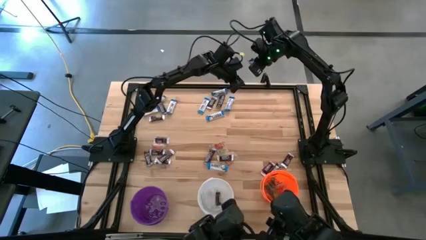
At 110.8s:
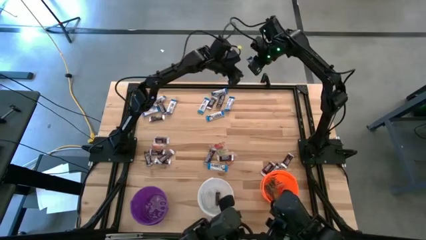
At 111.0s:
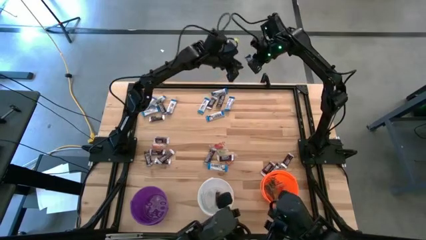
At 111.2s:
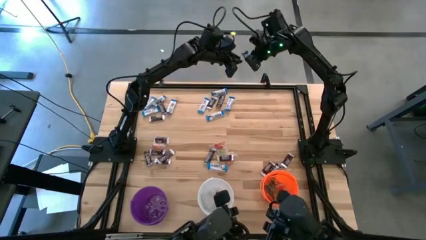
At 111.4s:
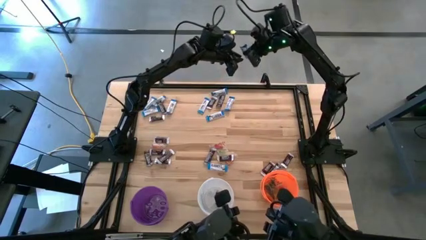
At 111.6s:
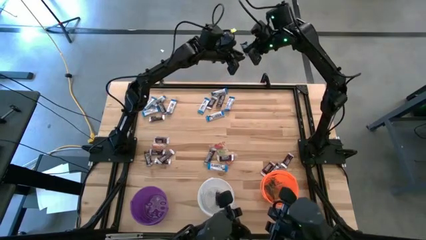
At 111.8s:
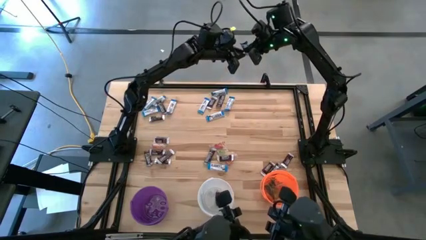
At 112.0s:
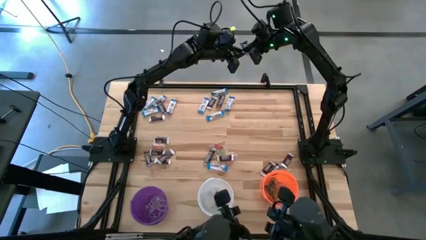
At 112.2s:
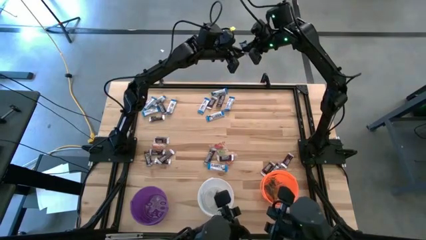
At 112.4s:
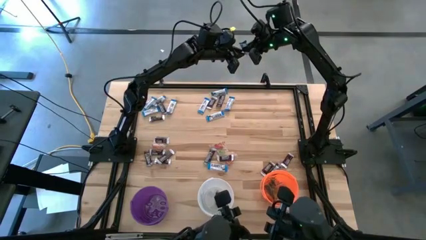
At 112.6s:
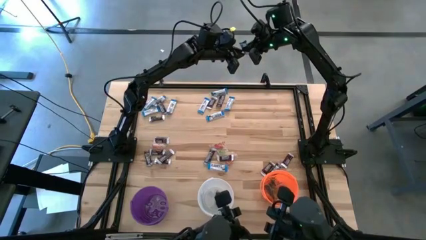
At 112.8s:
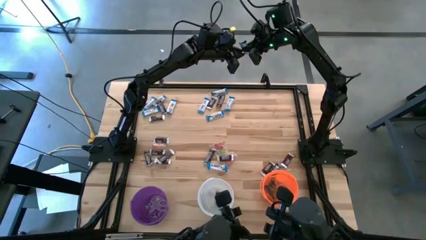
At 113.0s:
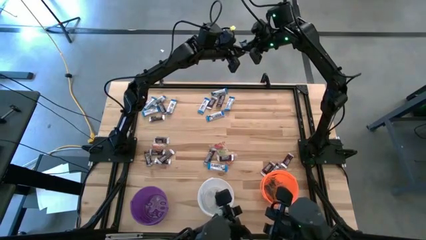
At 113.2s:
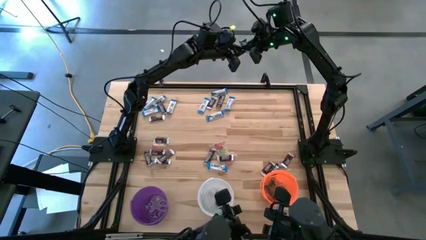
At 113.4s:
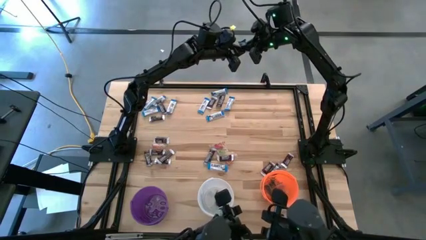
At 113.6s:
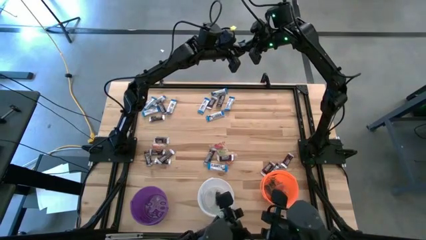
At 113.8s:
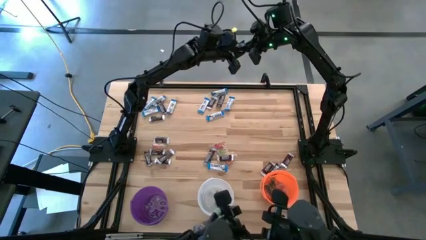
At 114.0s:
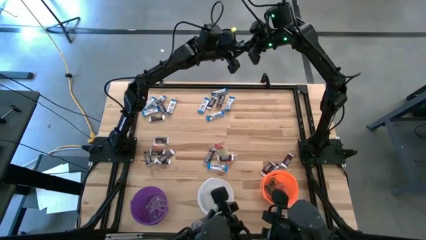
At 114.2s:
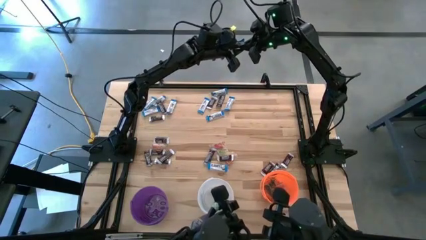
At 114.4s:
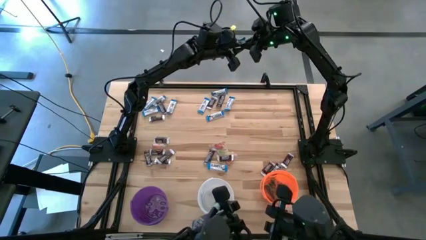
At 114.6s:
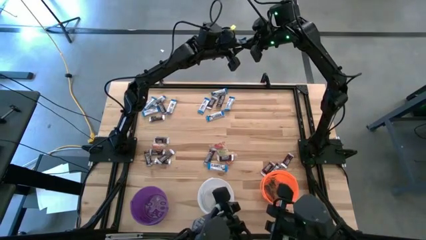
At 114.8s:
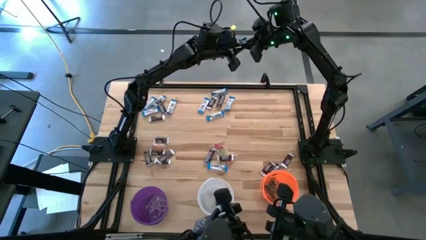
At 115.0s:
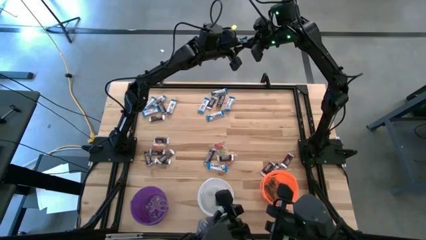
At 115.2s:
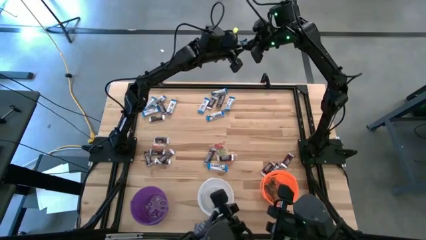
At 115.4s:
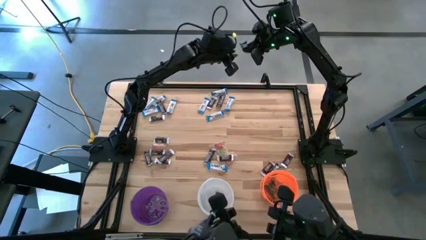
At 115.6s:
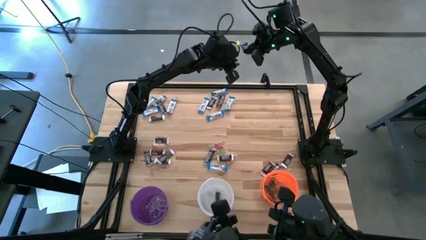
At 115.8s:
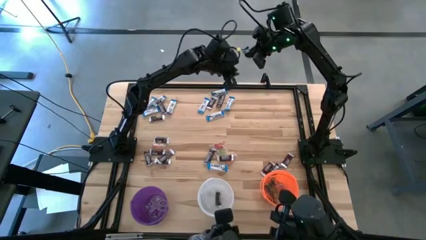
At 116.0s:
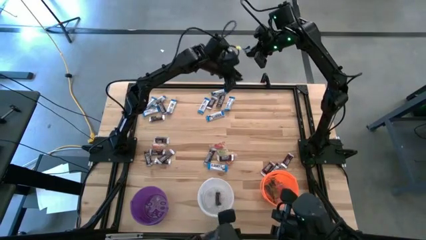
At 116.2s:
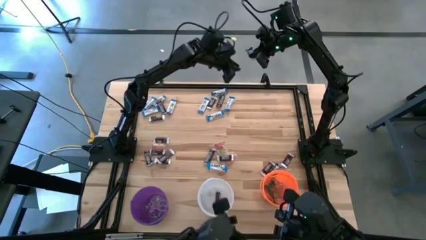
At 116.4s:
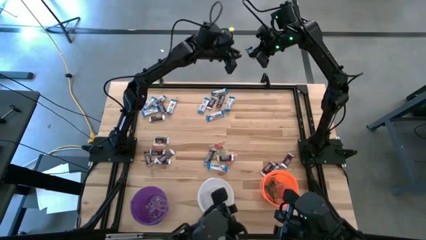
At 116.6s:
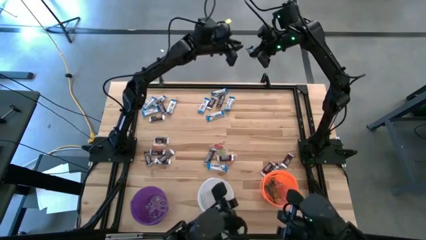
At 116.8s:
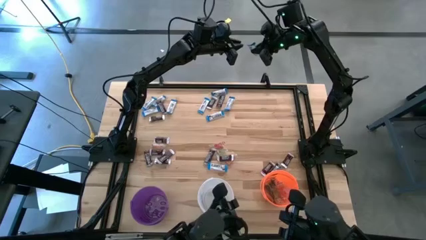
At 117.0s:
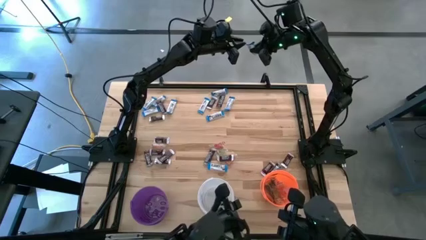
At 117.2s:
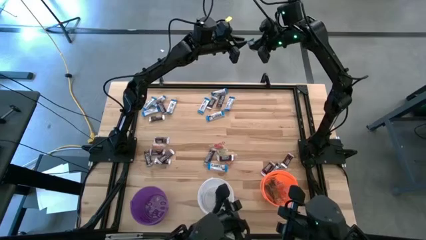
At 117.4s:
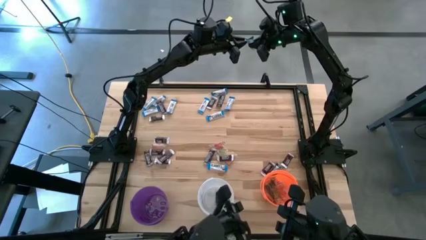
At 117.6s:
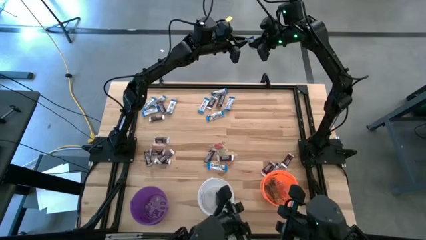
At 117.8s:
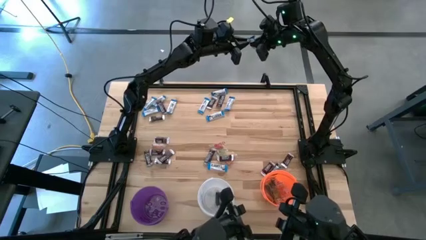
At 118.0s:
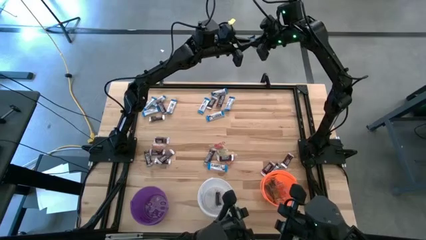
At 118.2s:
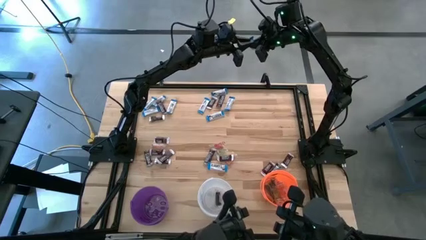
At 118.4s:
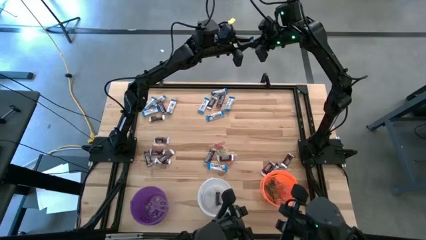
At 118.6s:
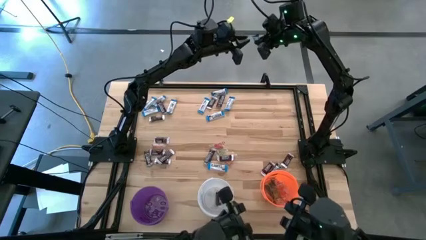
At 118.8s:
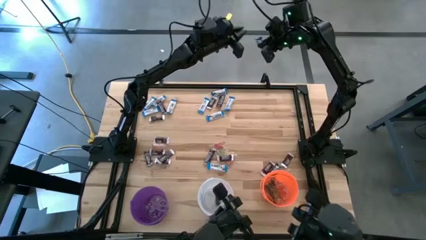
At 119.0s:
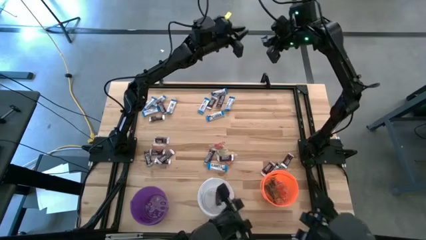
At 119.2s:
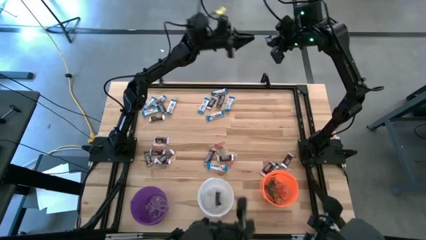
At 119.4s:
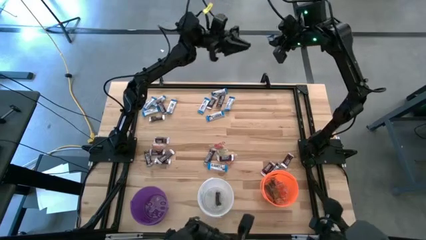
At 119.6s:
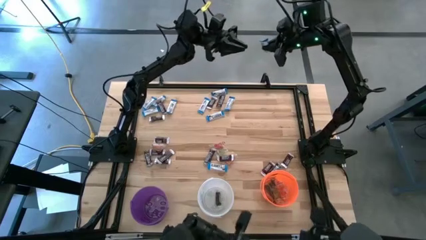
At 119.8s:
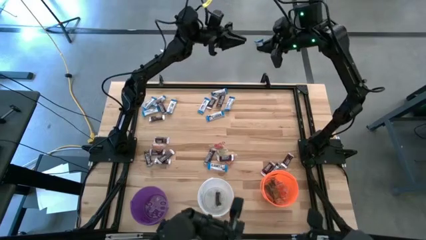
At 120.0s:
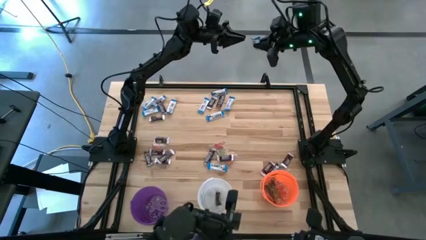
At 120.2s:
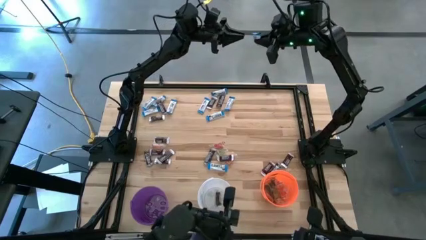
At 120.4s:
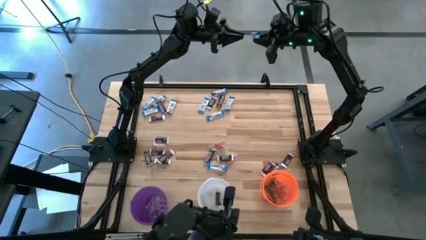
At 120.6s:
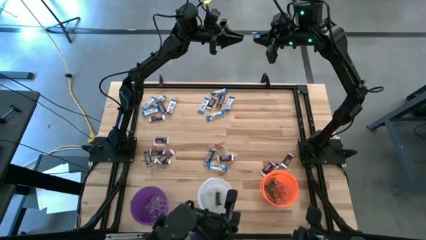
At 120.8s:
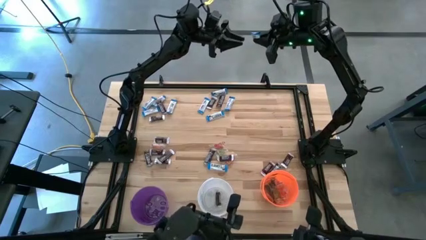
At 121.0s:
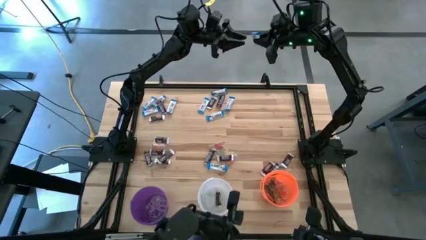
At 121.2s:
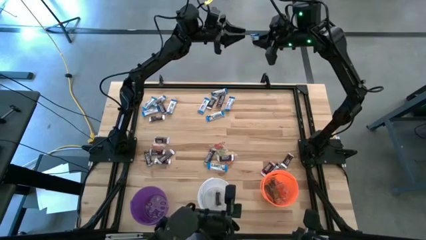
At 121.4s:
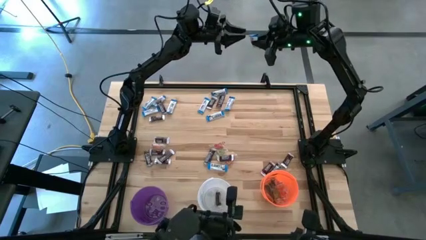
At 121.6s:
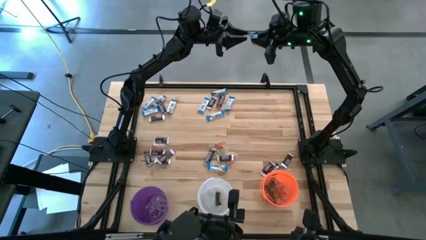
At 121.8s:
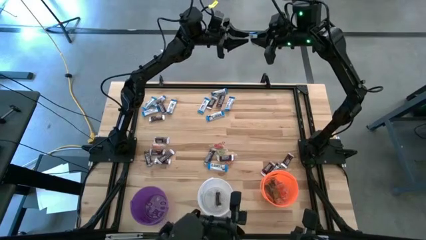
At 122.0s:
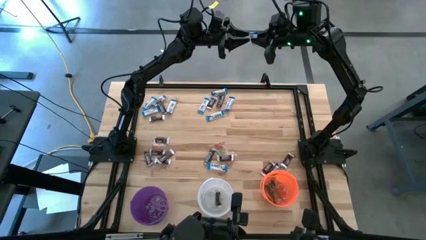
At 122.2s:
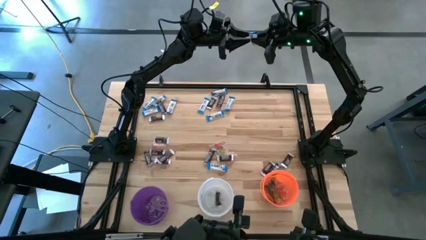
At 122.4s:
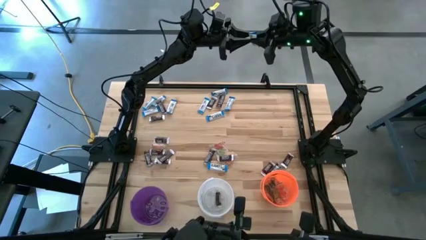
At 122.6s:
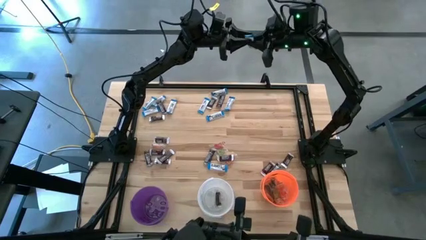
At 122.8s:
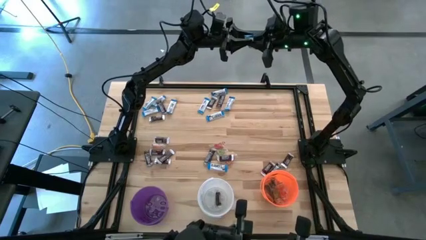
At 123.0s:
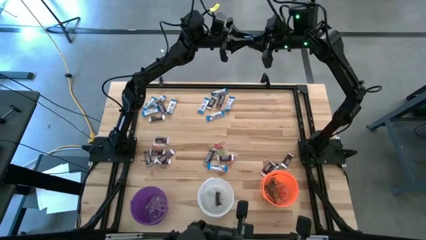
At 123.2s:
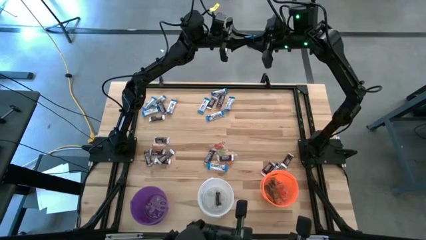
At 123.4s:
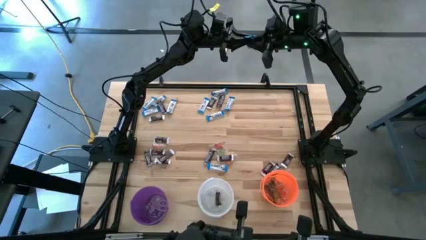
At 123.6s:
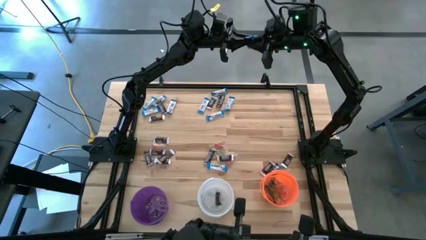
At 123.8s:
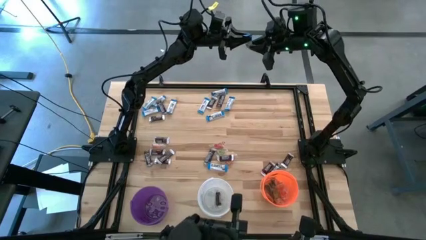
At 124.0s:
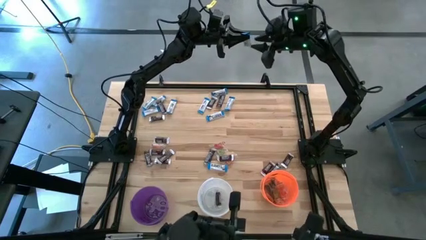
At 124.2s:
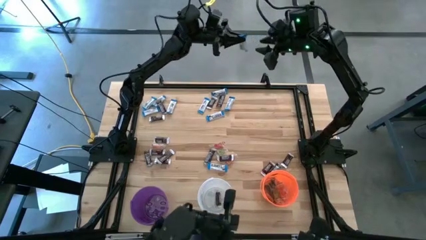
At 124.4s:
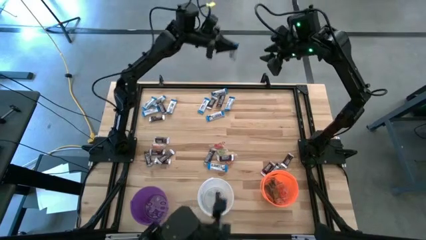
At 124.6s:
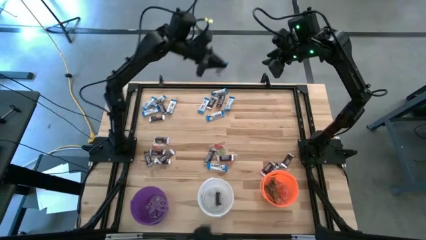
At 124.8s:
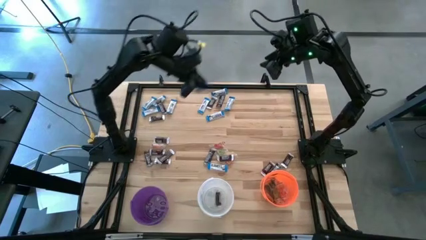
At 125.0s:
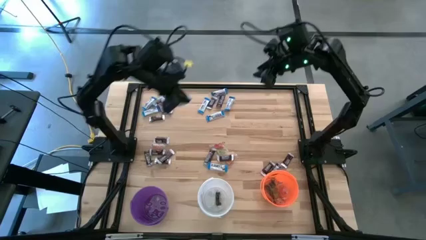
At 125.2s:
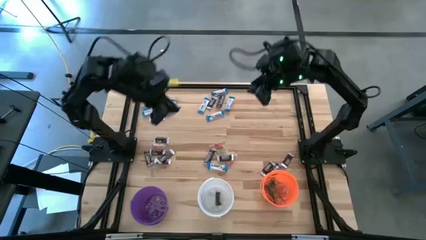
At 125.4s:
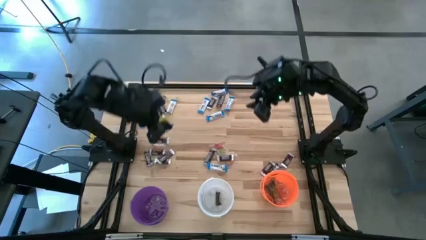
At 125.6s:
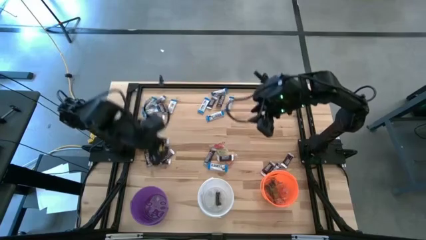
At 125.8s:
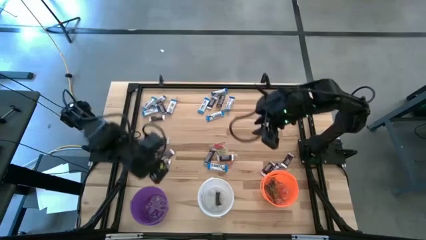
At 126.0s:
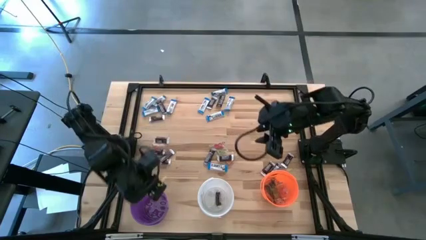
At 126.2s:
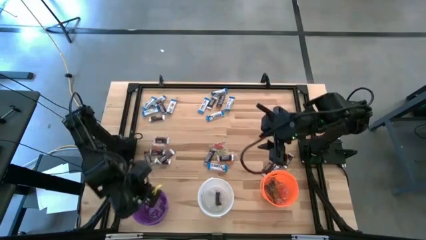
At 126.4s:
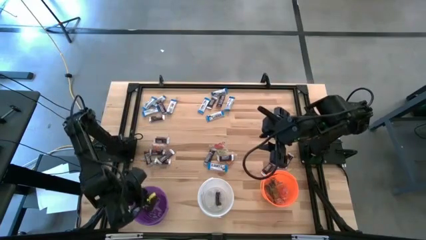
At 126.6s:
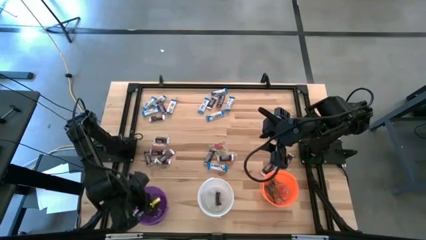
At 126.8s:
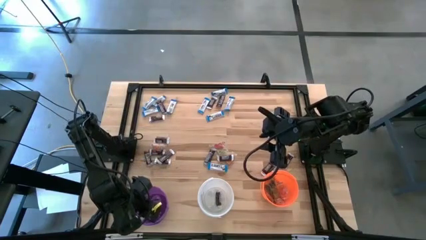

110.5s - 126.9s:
Task: Sort candy
Put the white chocolate into the violet bucket
